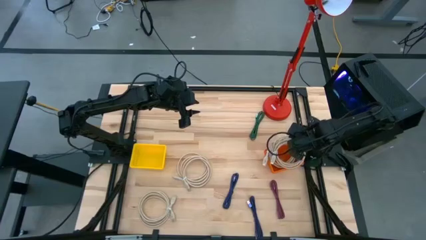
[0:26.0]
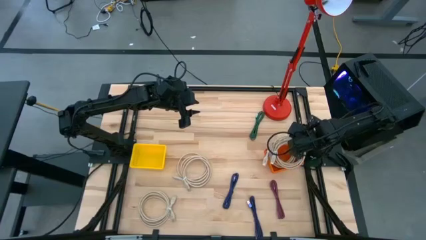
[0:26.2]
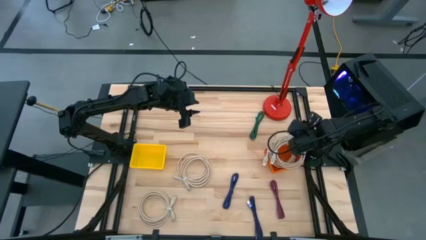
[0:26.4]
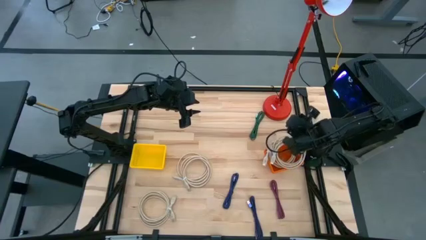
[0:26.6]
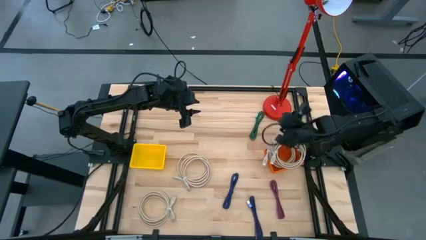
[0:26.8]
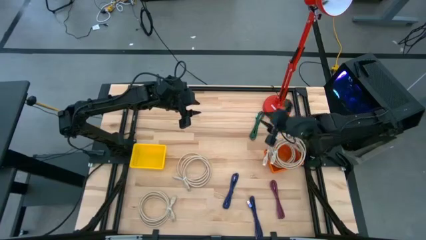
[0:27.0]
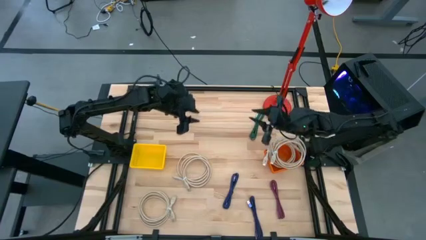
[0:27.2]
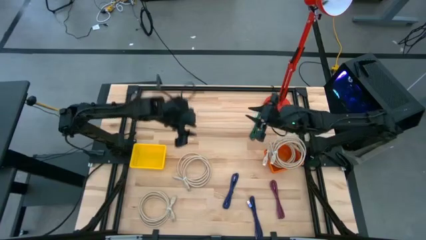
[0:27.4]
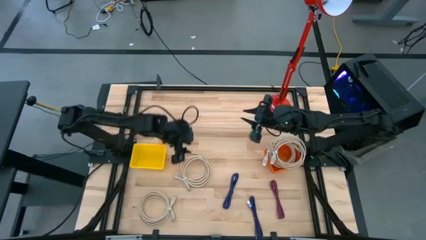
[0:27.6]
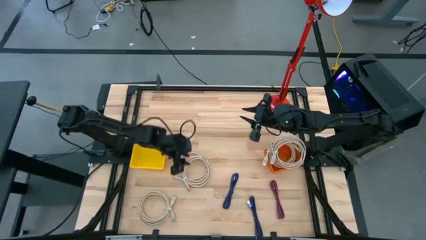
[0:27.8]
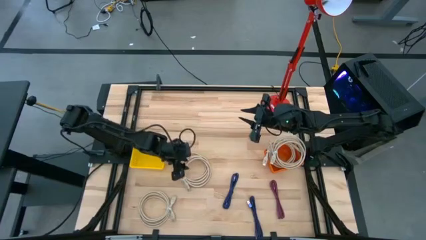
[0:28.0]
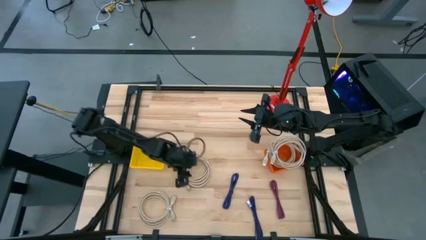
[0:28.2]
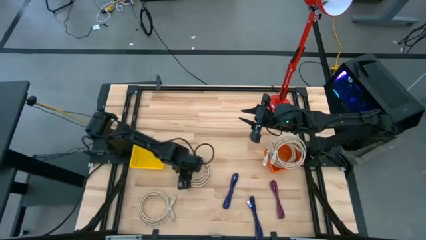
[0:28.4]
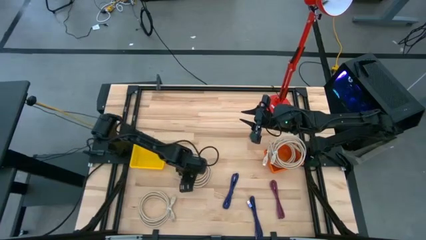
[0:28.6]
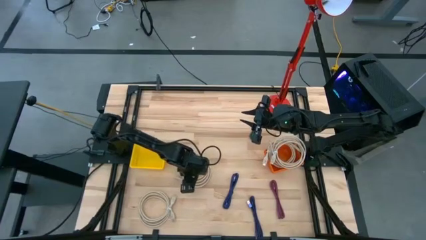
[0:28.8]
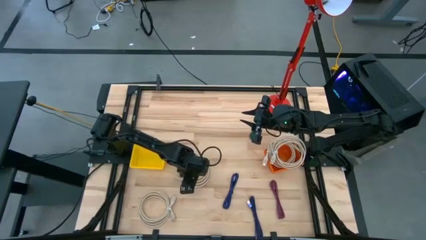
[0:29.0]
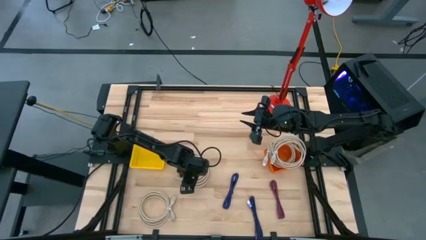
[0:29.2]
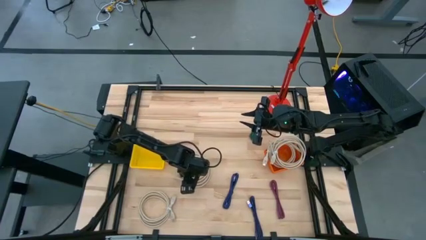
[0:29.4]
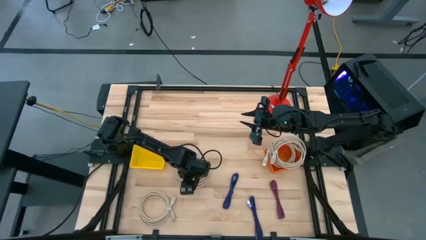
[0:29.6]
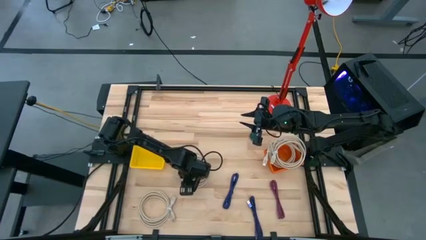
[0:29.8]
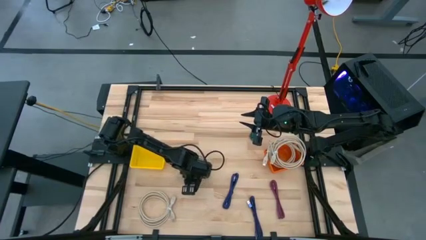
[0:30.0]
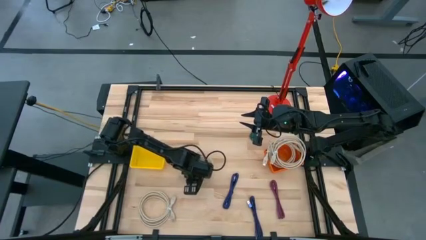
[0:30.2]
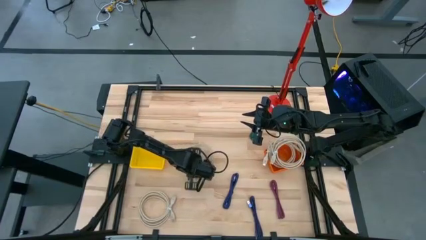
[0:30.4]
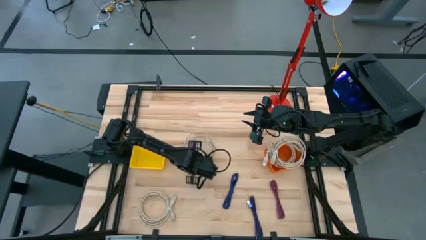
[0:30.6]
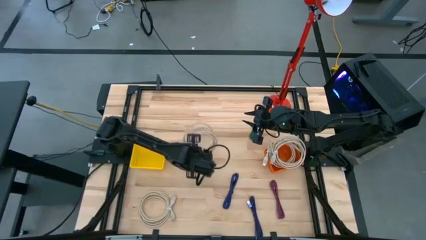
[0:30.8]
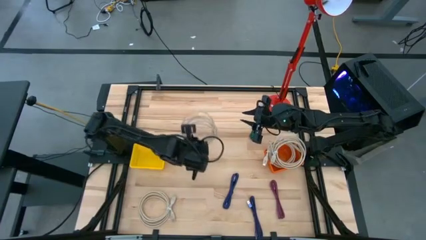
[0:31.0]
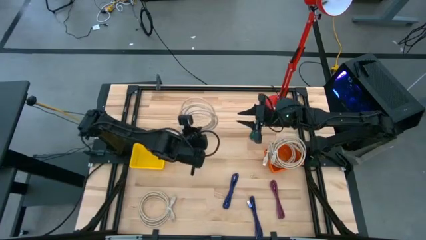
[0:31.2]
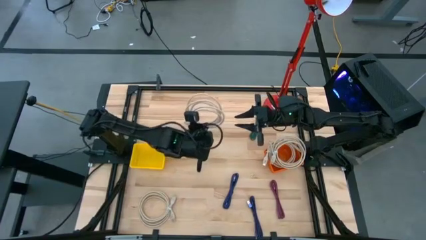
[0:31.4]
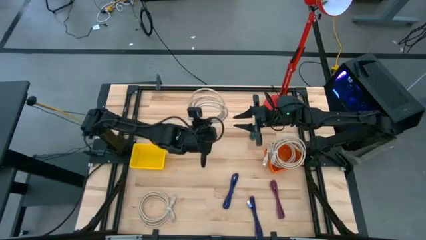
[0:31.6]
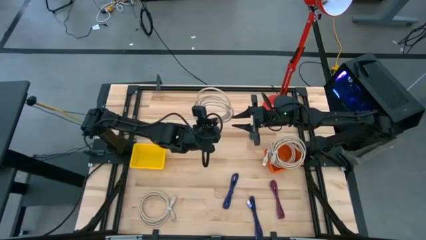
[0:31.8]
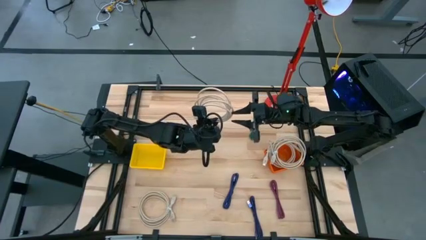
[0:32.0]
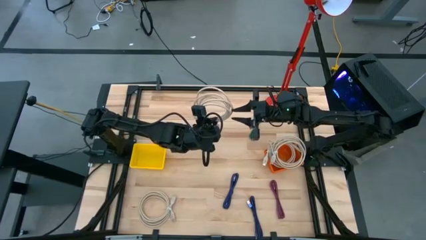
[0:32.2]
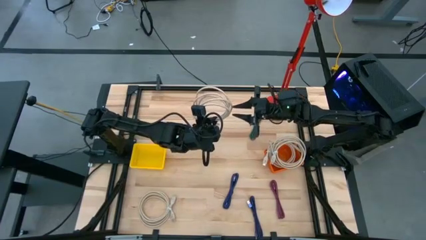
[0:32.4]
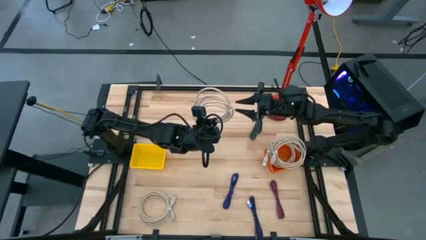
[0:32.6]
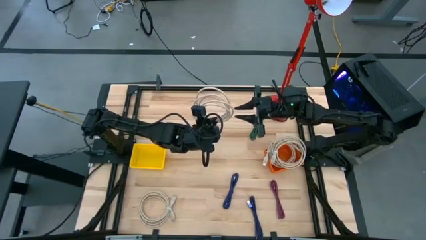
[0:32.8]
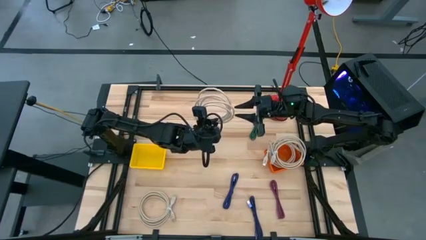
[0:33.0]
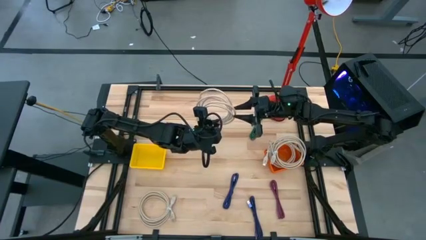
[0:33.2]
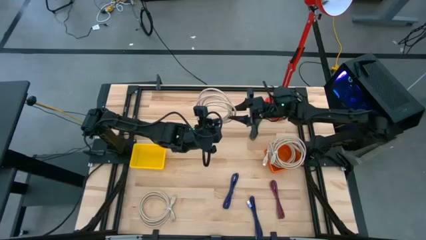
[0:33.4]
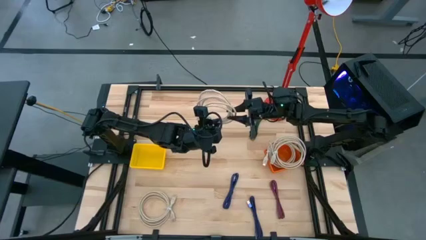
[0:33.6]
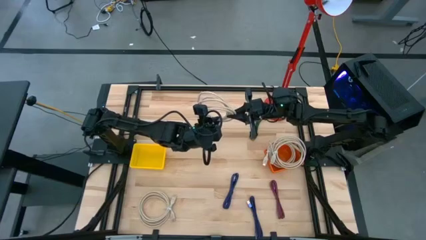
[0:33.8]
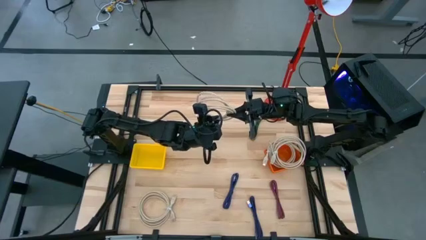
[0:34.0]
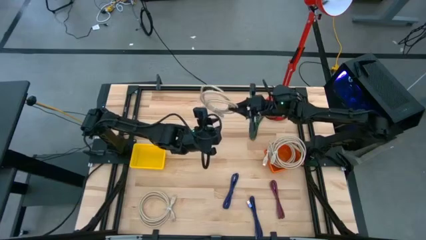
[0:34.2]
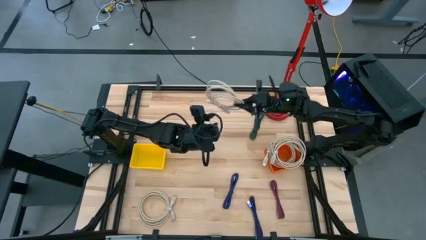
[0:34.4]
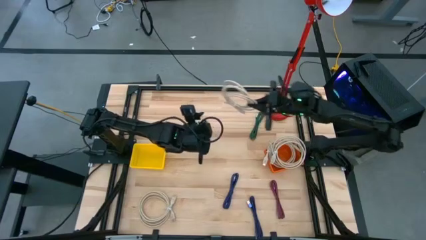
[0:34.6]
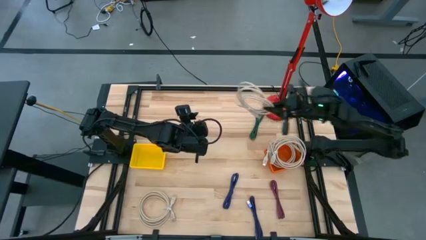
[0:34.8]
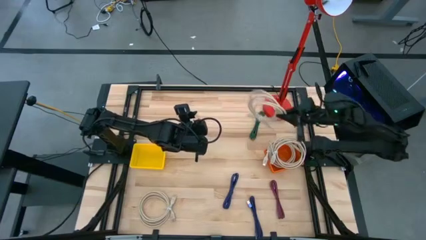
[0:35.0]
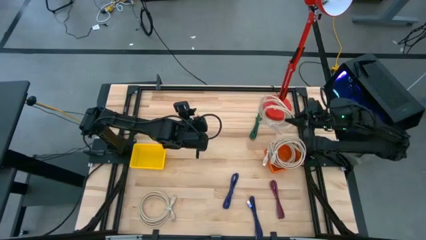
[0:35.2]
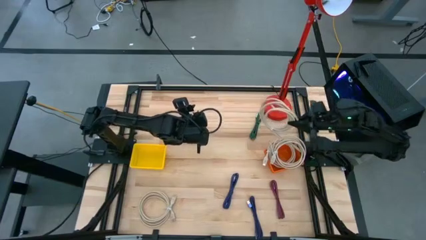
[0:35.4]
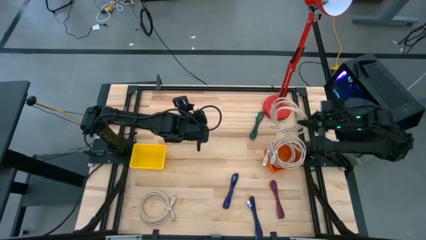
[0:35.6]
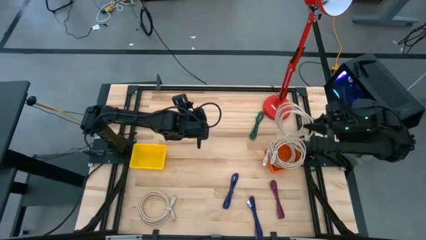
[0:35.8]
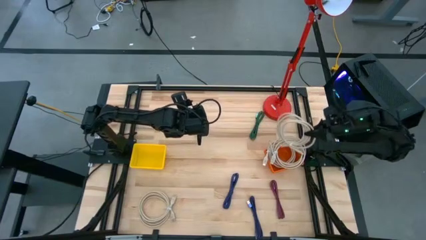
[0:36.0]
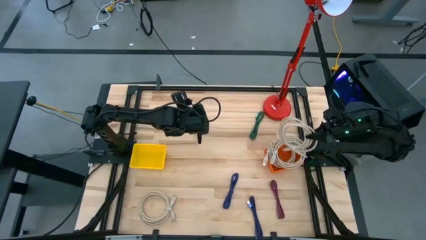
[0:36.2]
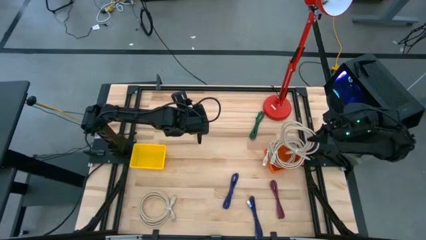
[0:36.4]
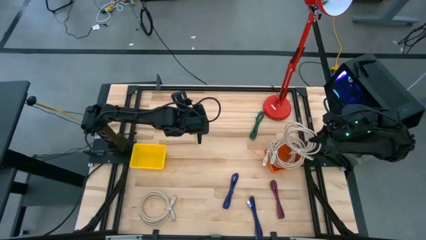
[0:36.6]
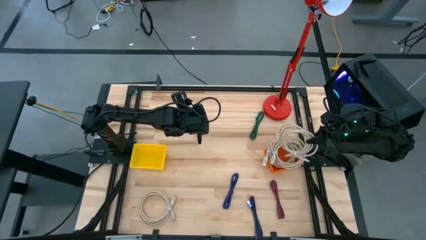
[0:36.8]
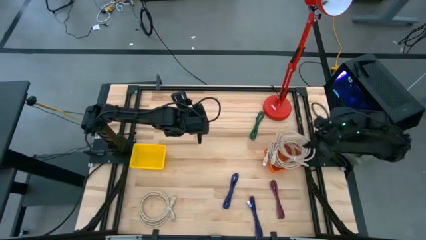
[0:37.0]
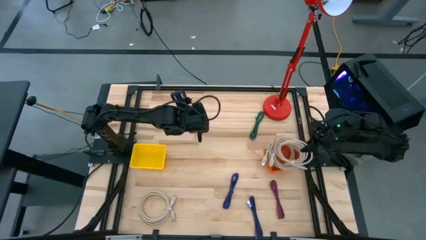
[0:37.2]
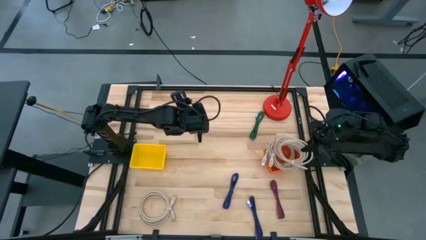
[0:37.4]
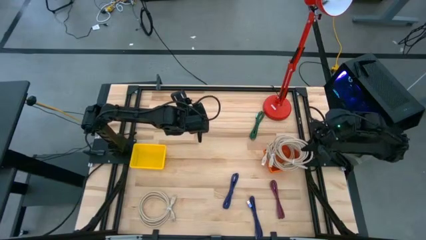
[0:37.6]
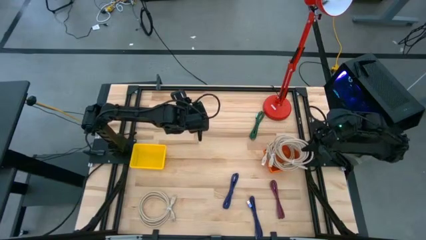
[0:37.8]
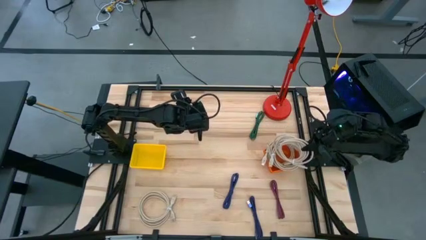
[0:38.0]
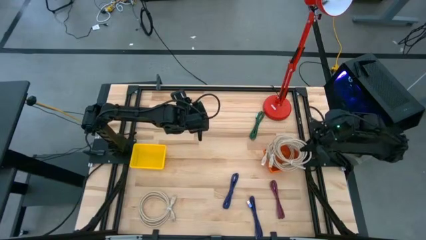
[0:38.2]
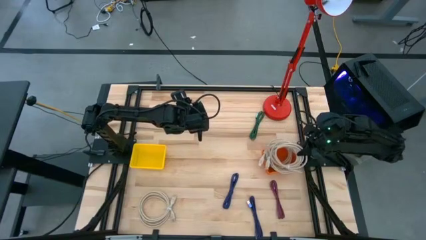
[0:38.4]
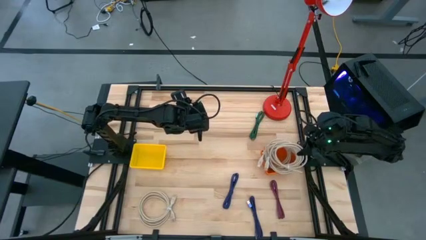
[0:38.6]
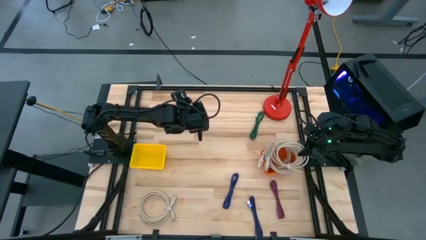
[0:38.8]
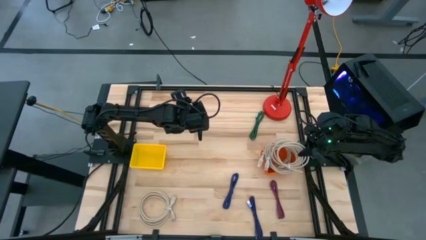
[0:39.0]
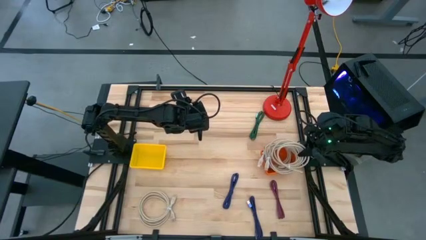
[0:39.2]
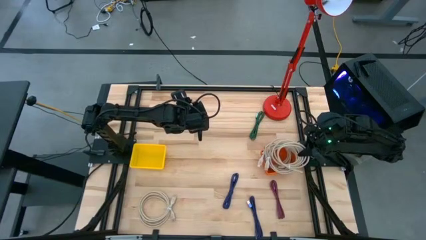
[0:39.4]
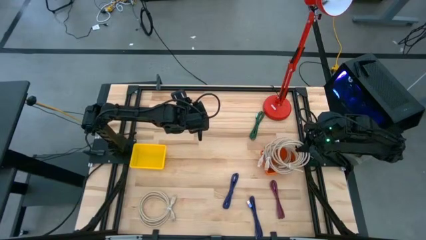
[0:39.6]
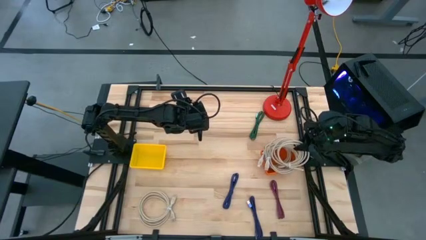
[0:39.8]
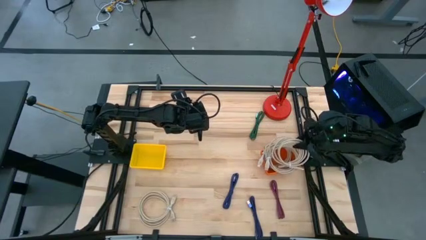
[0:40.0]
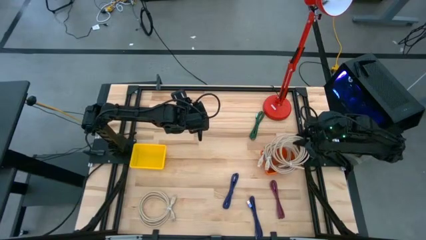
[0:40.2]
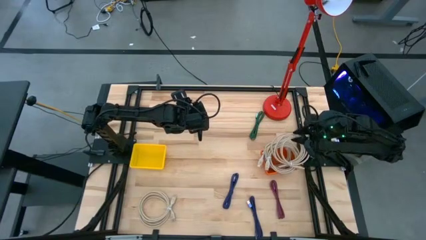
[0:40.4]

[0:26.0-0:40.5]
Task: Pick & Place USB Port
Put the brown HDMI cable into the orange bin

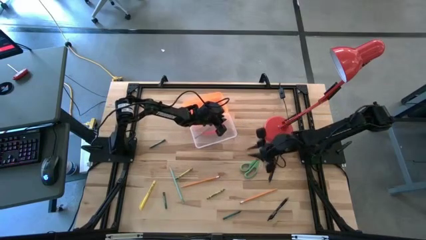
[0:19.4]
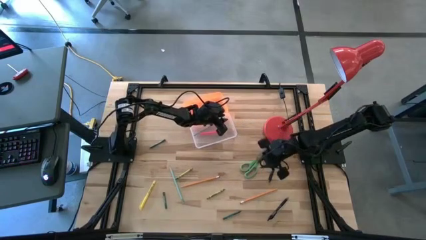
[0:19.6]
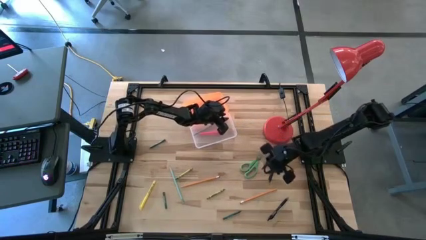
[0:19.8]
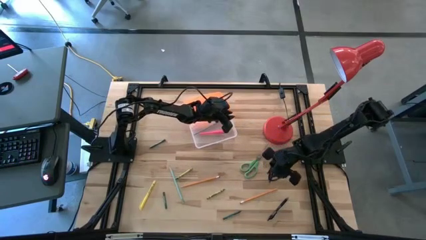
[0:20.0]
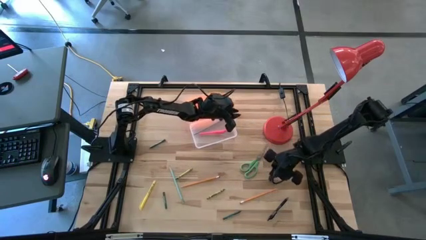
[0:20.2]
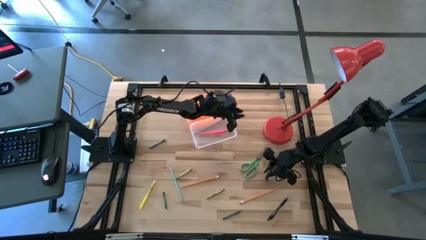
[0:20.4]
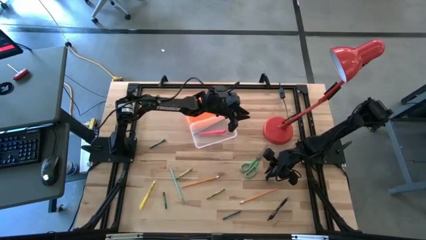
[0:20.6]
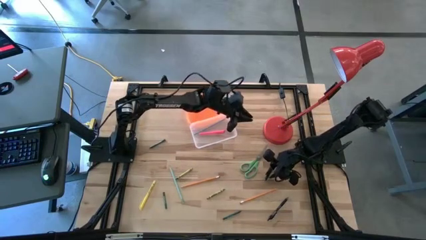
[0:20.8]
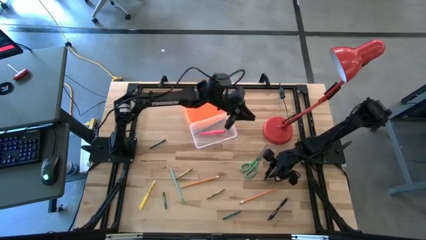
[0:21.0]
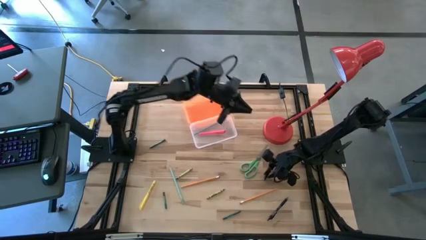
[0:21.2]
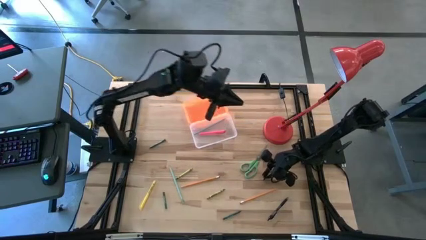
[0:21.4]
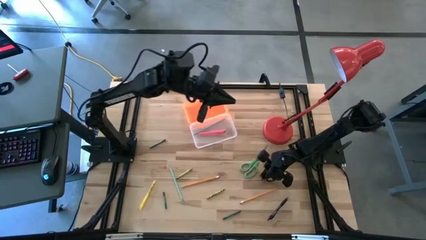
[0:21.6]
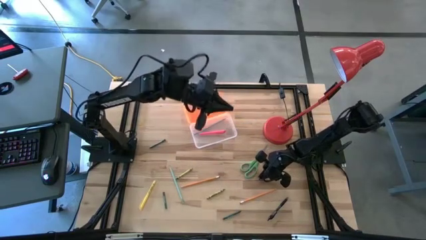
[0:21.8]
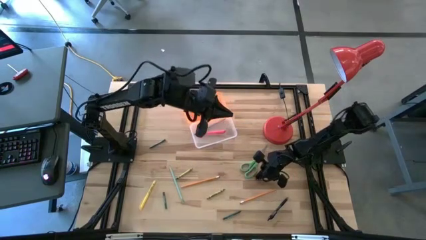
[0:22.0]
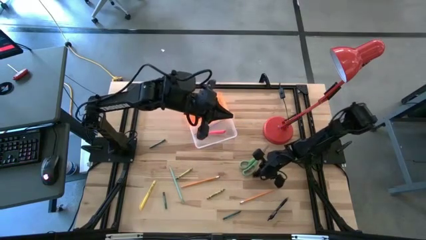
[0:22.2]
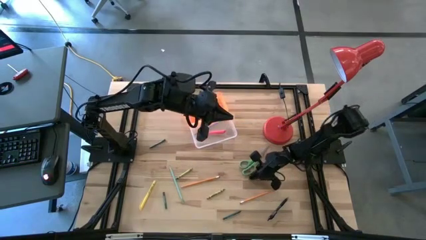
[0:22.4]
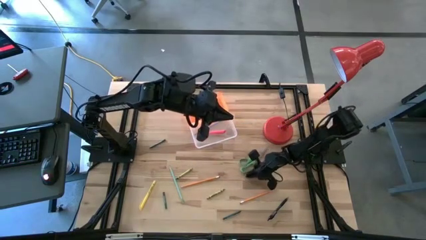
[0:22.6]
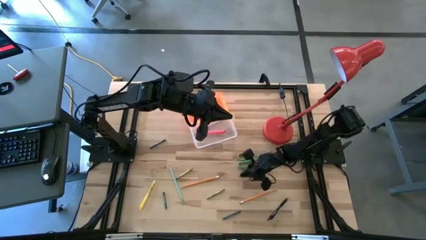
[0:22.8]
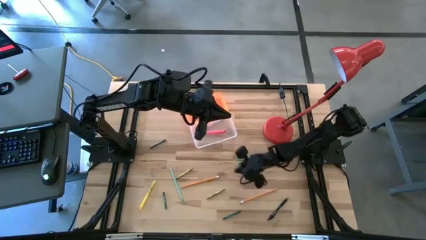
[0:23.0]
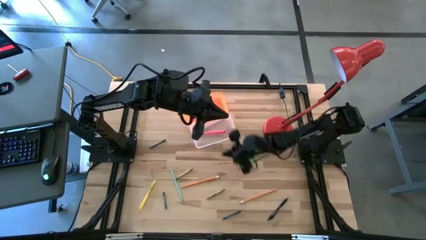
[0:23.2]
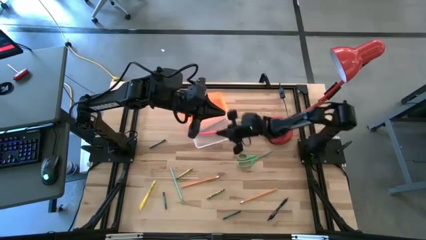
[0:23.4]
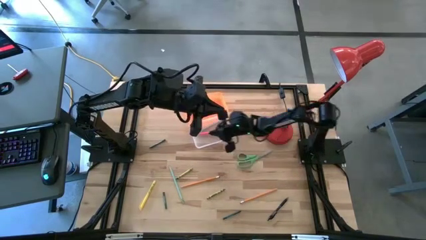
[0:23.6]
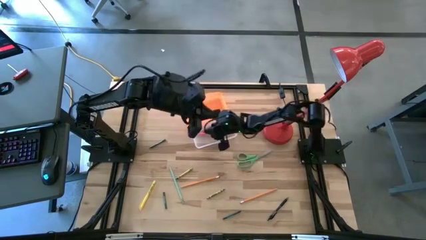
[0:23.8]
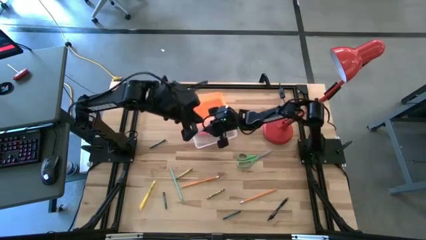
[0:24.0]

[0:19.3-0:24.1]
Task: Pick & place school supplies into a supply box
Put the black pen into the orange supply box
